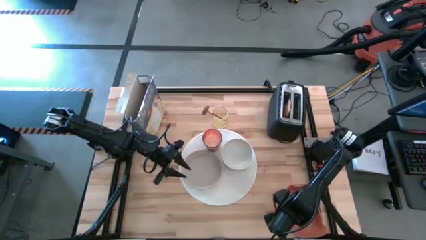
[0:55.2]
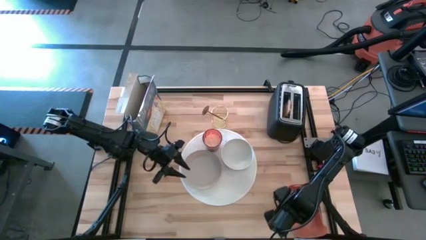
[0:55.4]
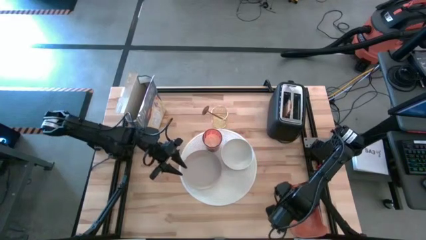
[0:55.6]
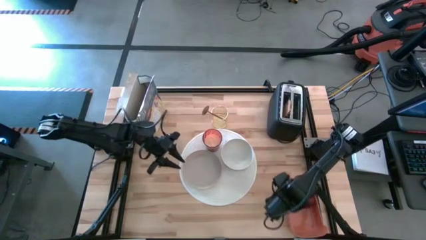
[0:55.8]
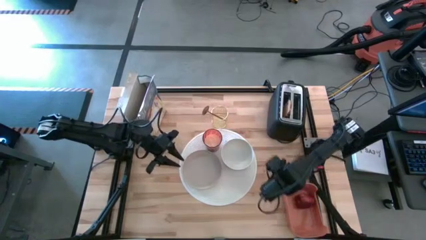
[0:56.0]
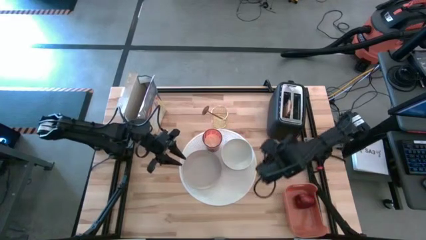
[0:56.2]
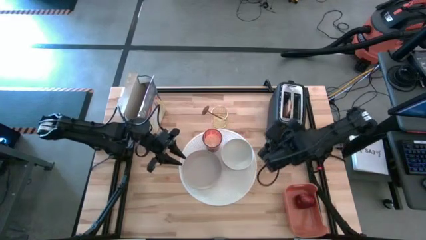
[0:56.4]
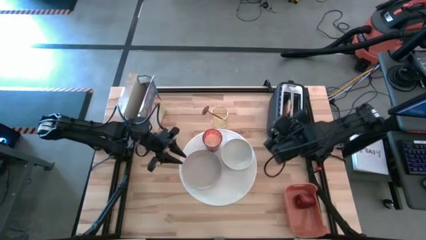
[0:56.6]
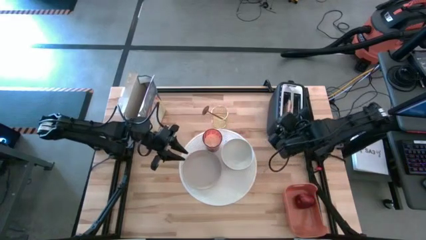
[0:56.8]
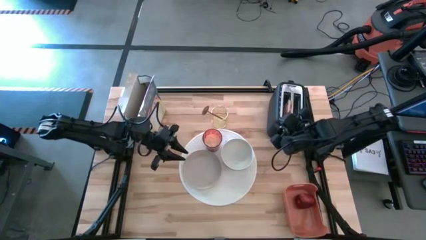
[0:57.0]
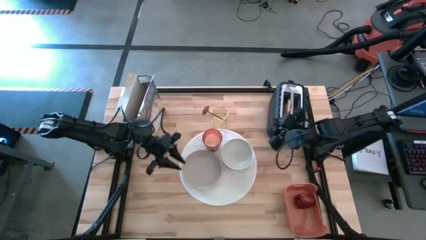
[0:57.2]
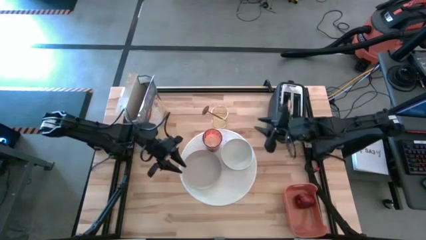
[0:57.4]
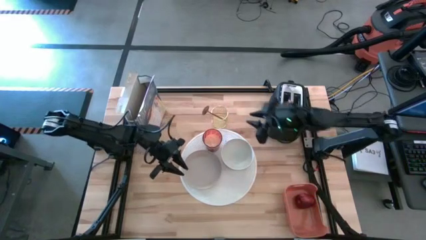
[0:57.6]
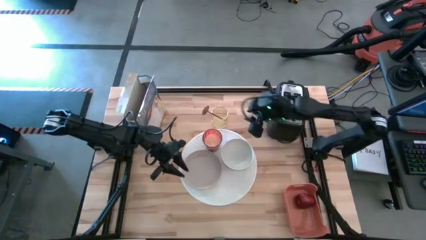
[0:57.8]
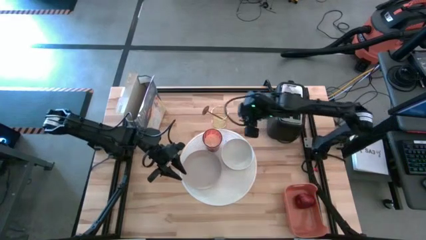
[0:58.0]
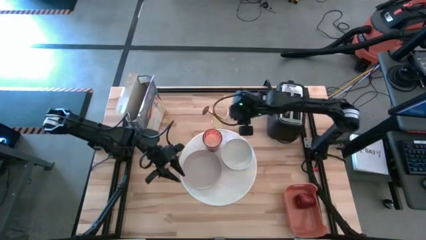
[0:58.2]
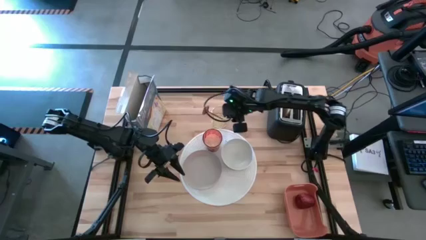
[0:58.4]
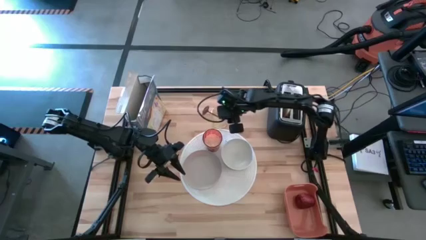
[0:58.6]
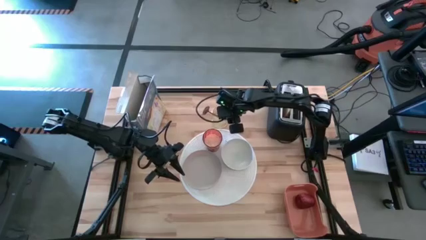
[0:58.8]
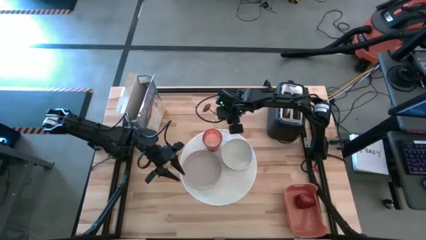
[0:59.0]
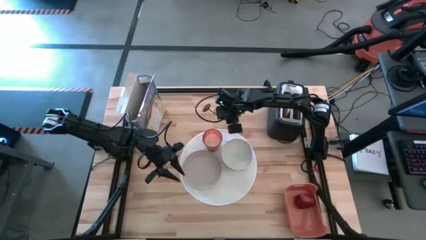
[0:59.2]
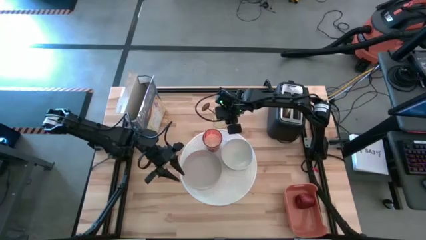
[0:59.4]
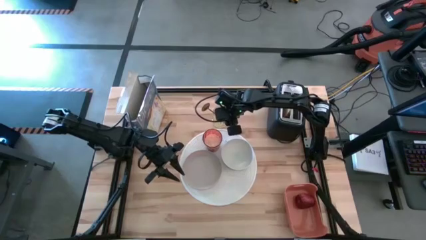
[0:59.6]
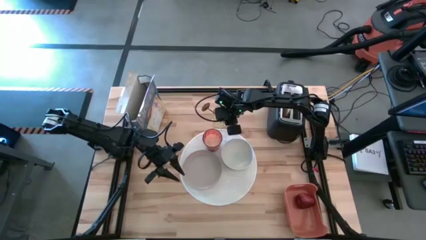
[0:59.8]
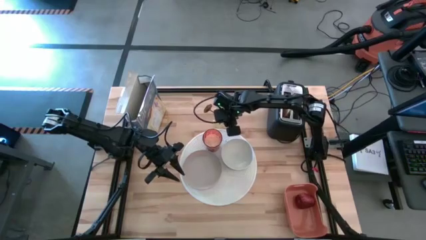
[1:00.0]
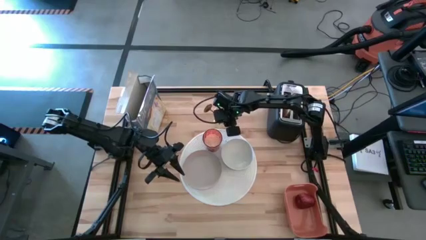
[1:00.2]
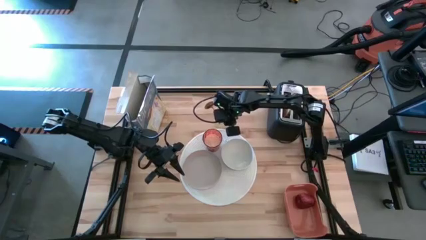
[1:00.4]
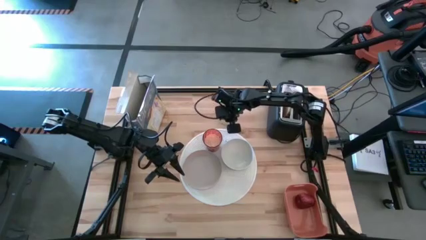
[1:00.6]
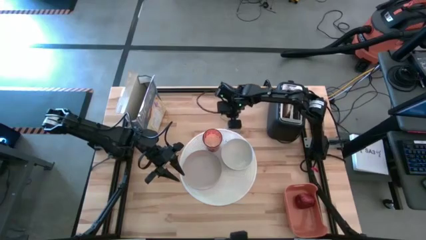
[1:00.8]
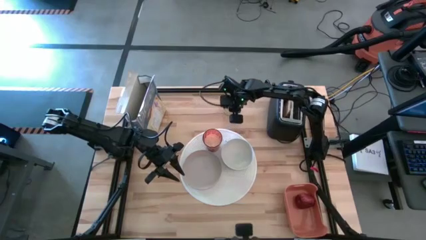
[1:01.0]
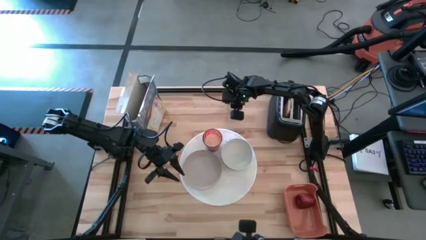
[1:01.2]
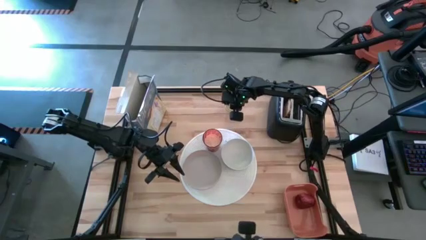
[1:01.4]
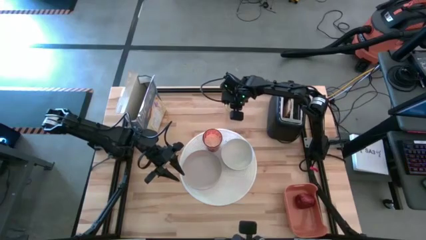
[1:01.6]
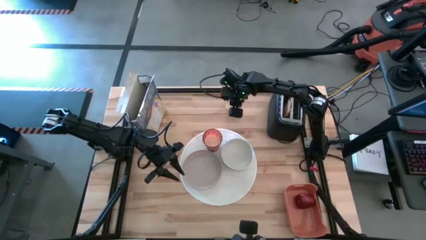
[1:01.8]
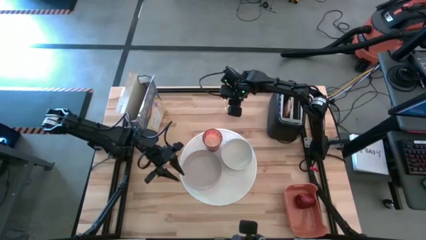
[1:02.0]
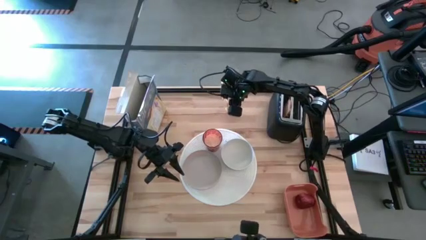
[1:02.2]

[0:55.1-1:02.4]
Task: Arrange a breakfast setting
Move the silverware cup with the spoon to the top right of the table

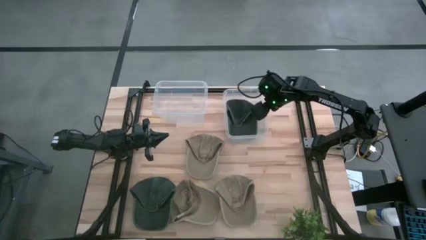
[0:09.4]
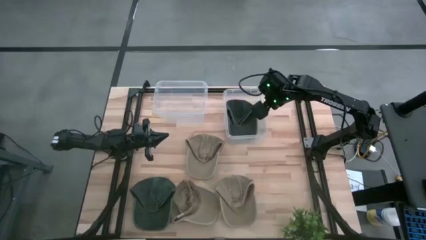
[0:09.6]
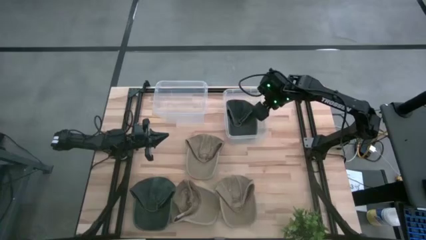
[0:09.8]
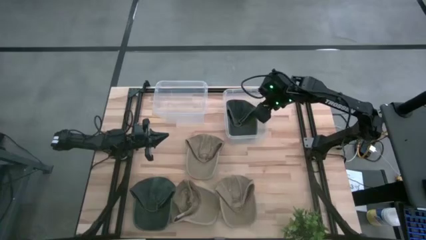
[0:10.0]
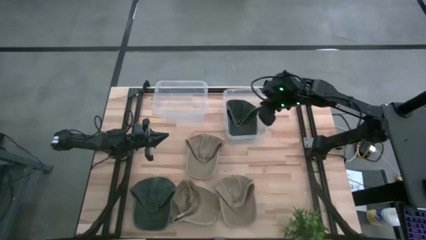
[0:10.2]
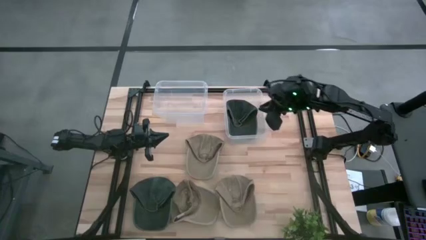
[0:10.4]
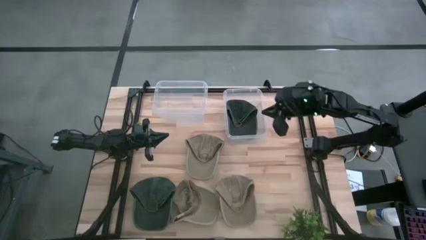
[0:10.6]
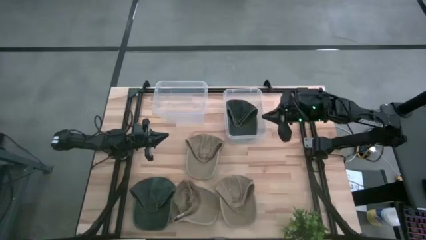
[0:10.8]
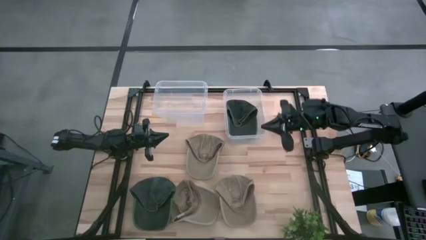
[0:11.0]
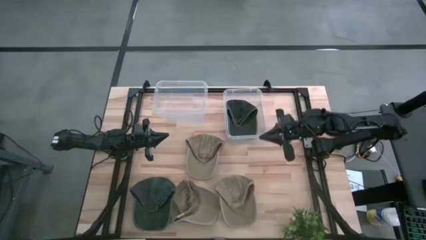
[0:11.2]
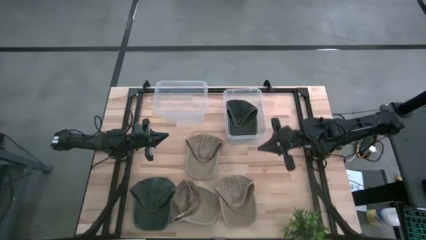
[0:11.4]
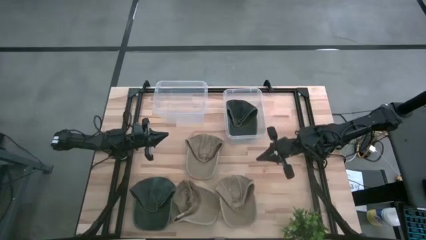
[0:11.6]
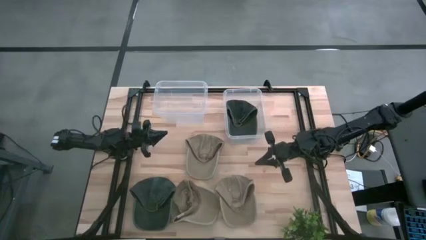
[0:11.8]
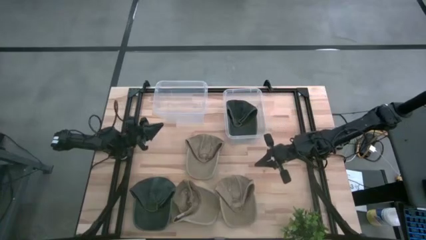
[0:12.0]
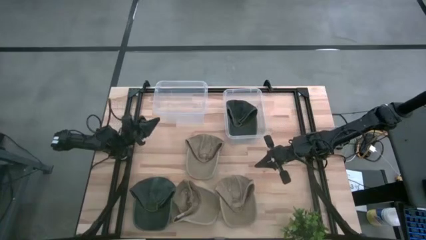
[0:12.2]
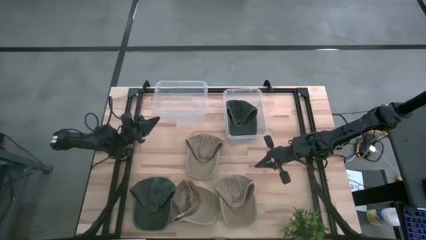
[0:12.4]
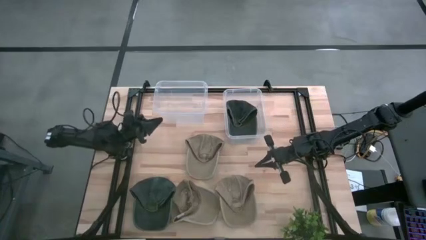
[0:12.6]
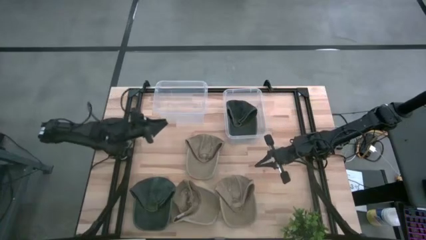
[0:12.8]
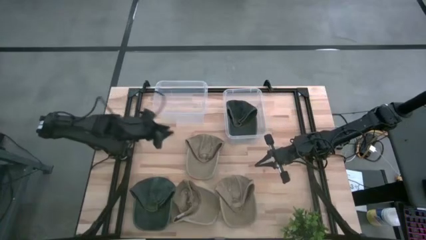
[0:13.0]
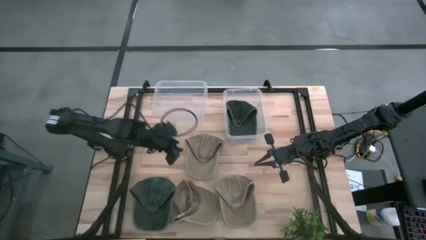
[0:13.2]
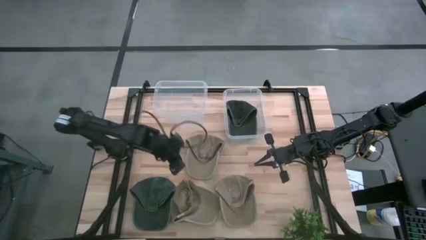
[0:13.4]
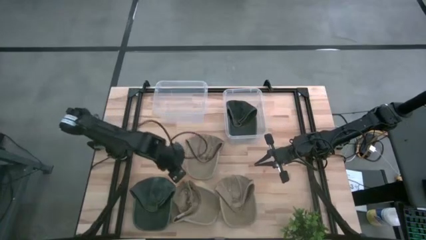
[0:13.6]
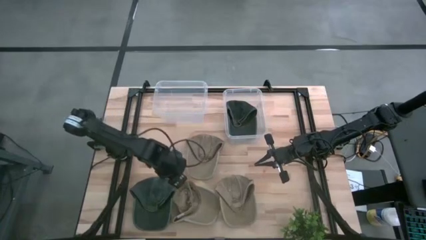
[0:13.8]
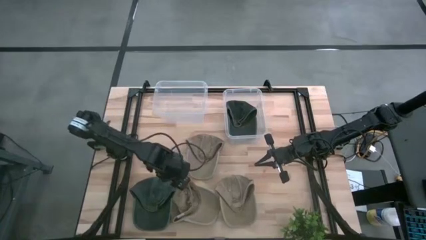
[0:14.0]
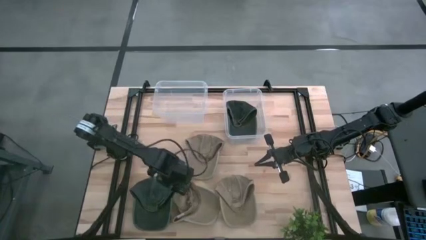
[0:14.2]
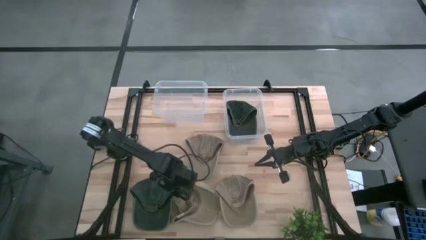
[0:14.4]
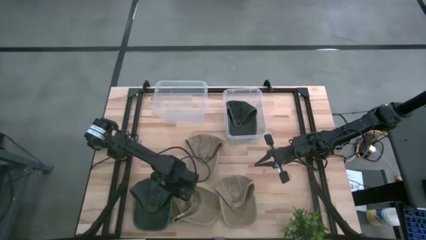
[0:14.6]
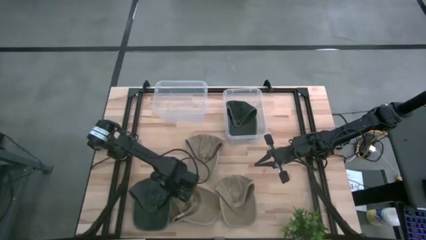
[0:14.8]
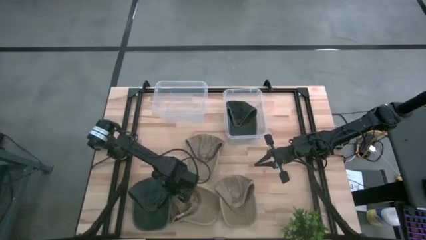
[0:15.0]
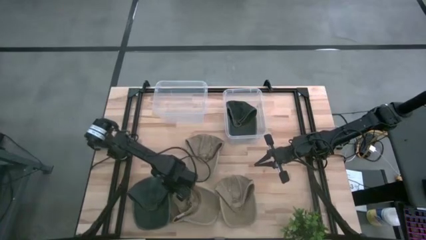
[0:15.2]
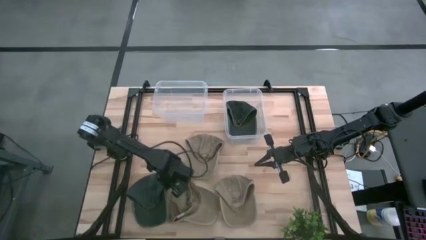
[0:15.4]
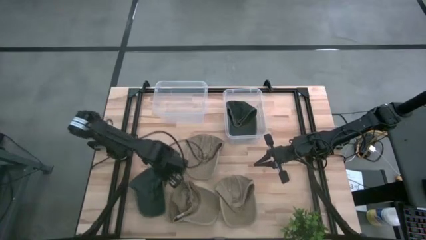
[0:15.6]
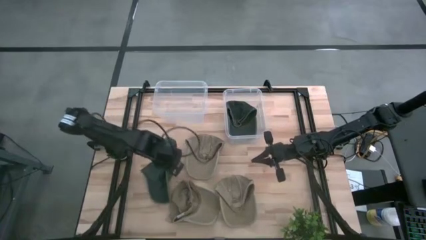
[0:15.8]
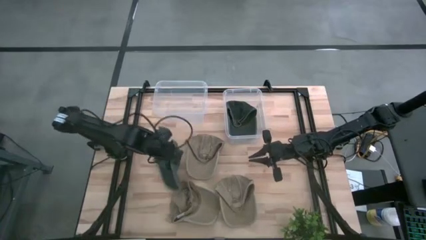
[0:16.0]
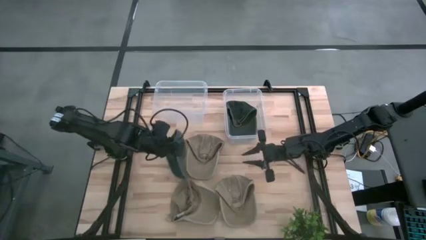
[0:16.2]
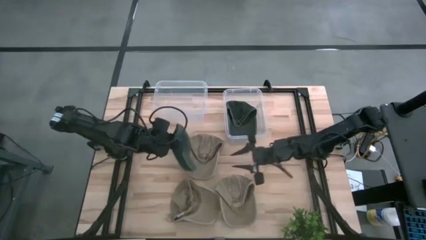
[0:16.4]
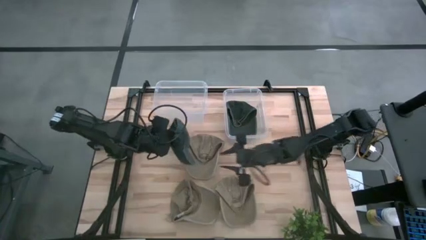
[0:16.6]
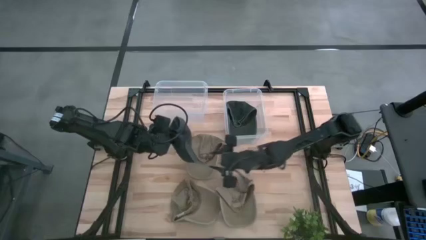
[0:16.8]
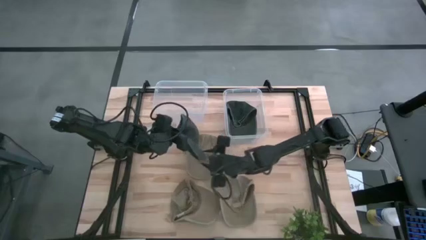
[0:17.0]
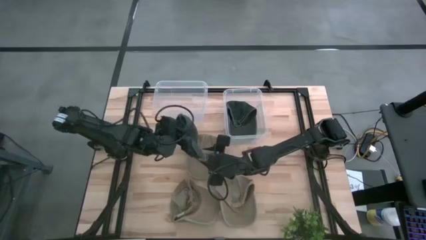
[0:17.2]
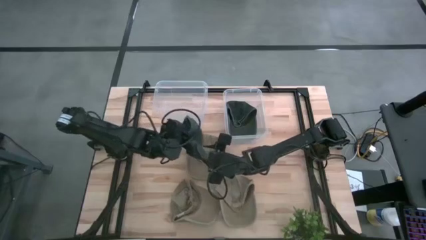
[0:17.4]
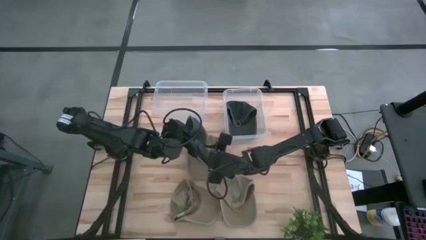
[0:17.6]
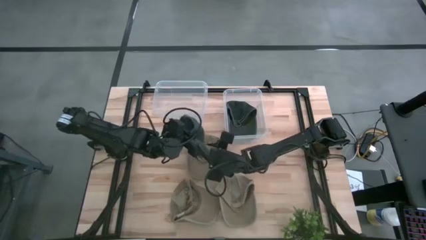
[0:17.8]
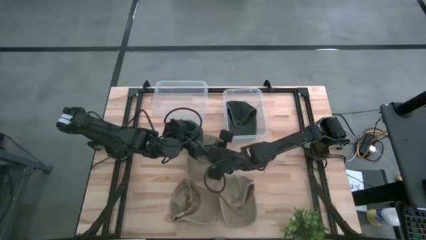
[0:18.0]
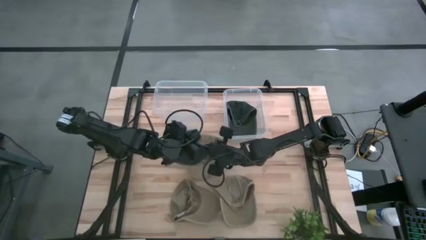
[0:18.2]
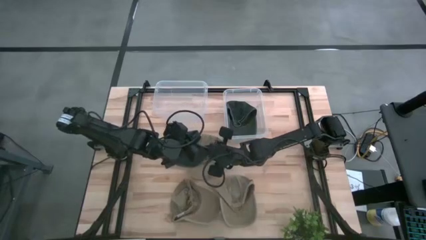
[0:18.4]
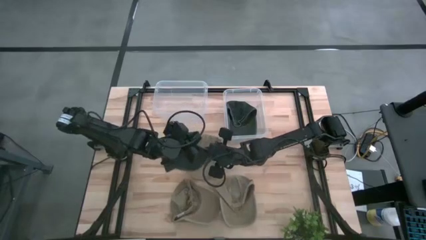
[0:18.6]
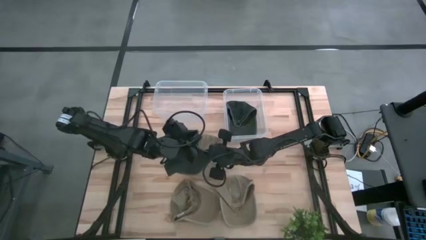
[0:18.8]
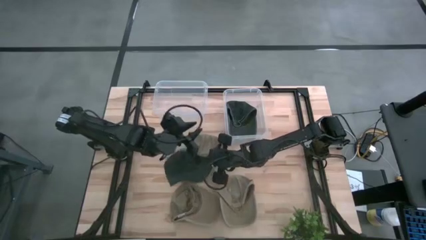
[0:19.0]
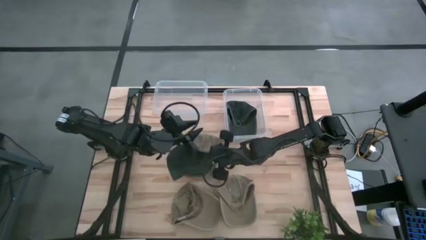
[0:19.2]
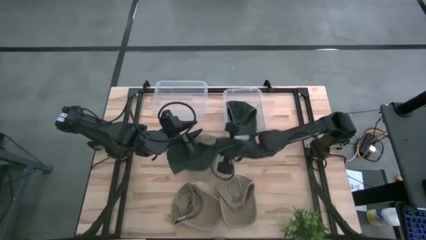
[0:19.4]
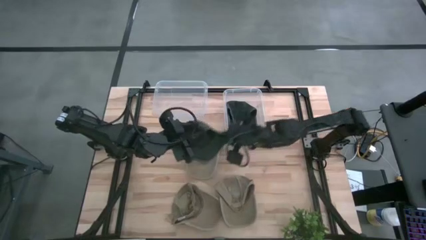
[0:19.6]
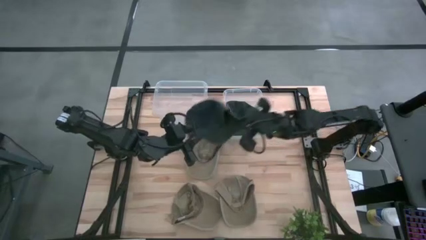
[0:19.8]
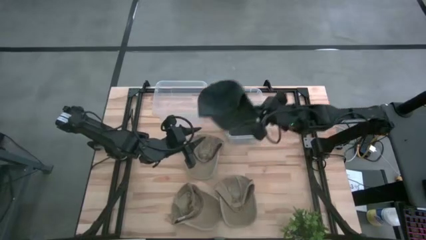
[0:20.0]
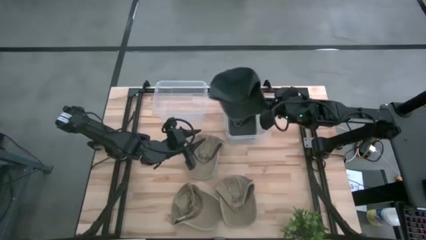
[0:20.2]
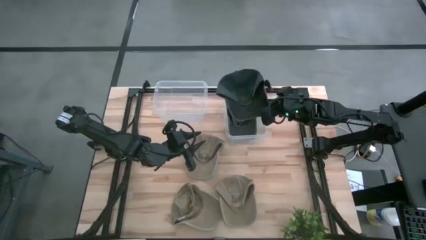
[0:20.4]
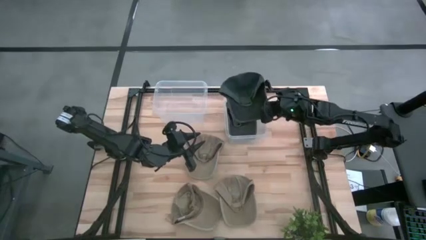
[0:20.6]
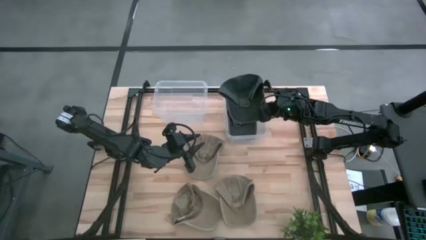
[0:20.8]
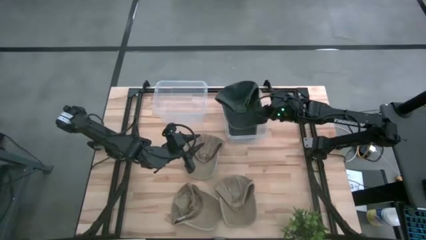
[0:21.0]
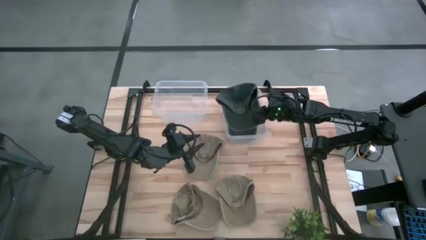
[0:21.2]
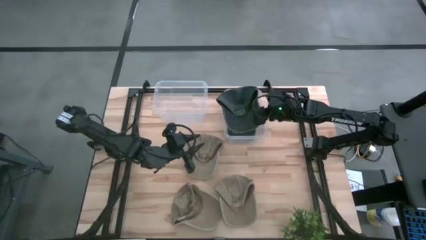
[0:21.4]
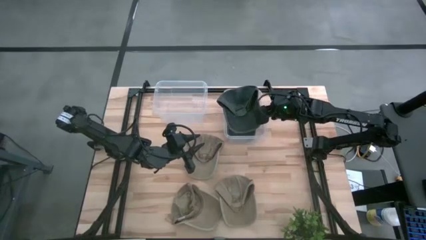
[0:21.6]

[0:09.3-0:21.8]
Task: Pick & Place hat
Put the gray cap into the right transparent bin
